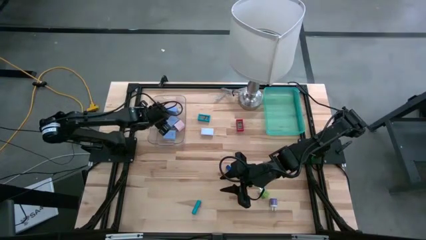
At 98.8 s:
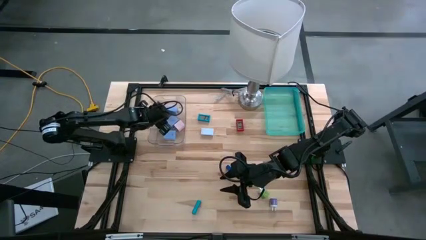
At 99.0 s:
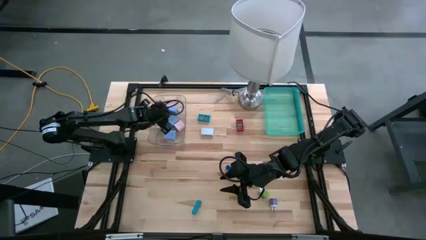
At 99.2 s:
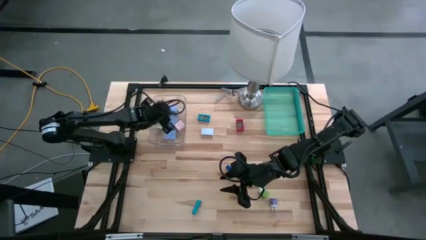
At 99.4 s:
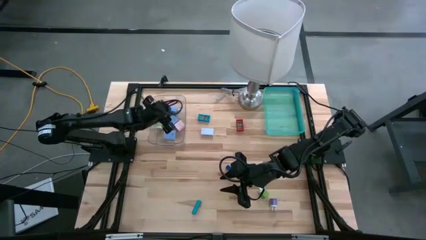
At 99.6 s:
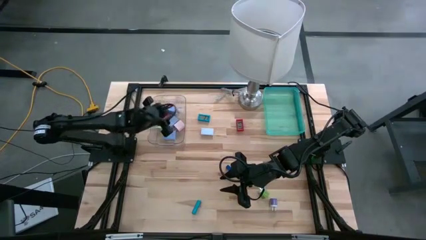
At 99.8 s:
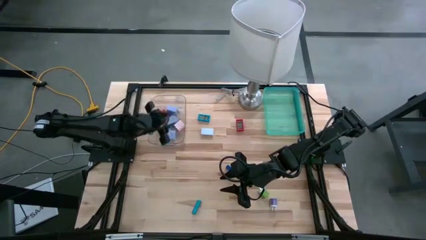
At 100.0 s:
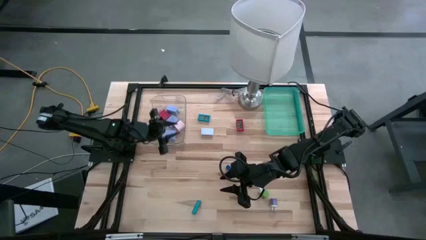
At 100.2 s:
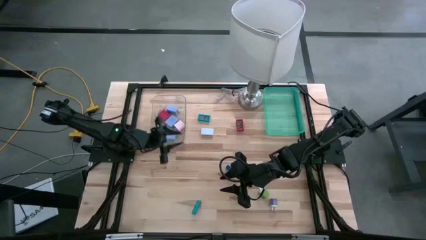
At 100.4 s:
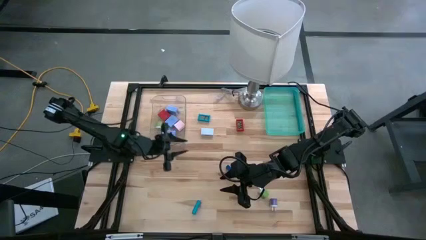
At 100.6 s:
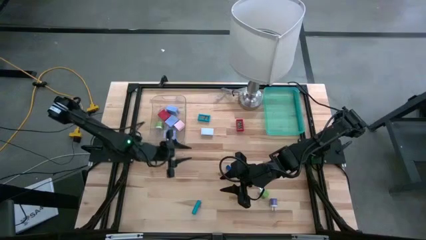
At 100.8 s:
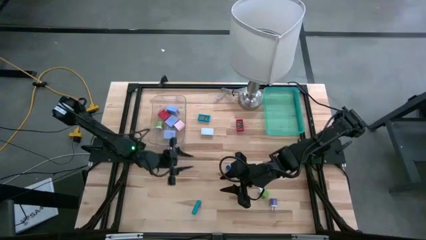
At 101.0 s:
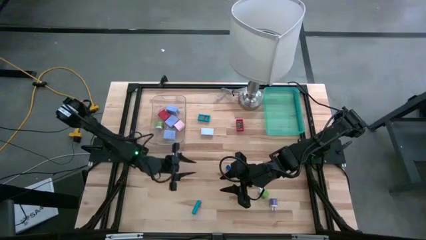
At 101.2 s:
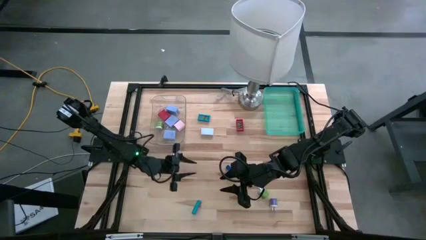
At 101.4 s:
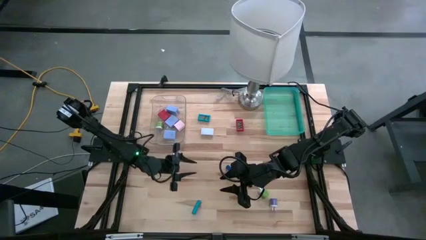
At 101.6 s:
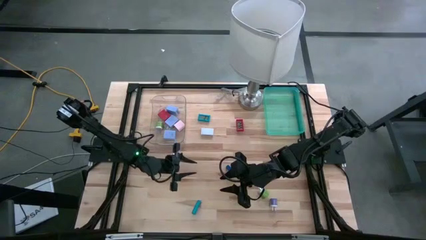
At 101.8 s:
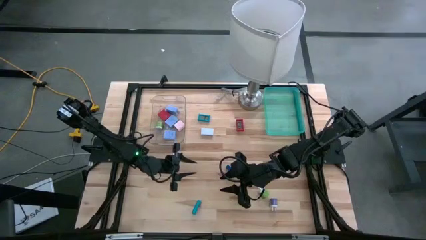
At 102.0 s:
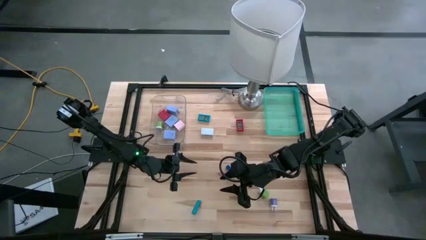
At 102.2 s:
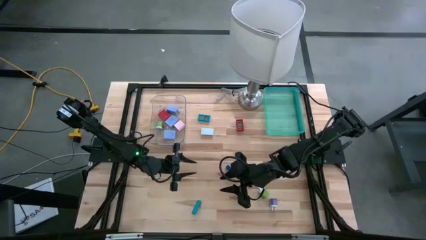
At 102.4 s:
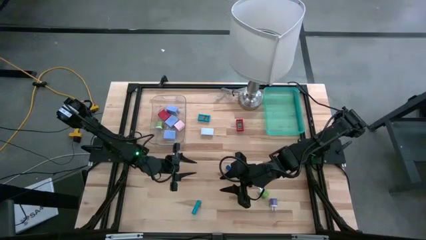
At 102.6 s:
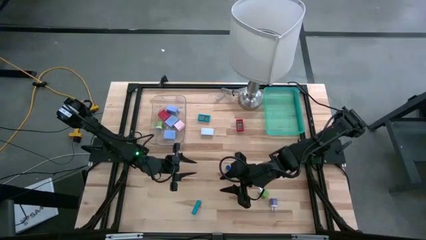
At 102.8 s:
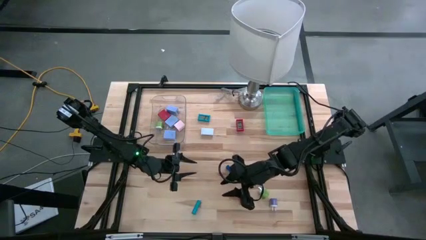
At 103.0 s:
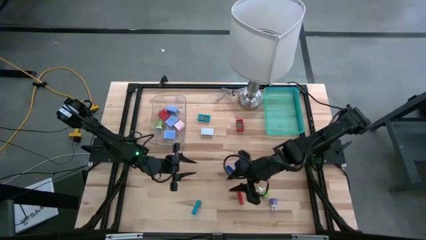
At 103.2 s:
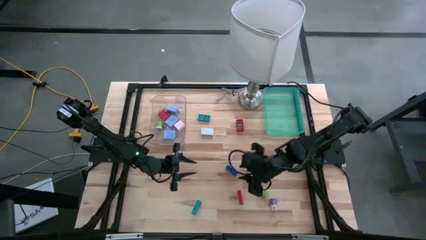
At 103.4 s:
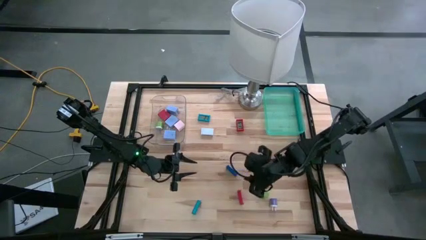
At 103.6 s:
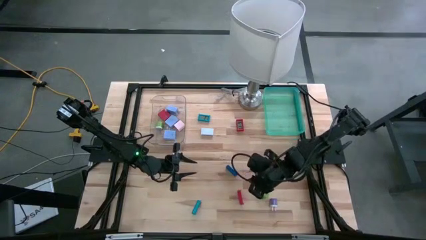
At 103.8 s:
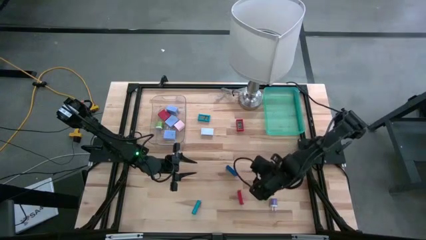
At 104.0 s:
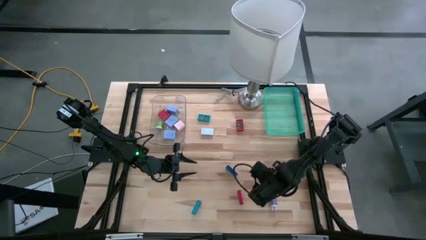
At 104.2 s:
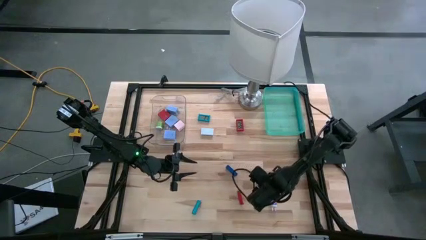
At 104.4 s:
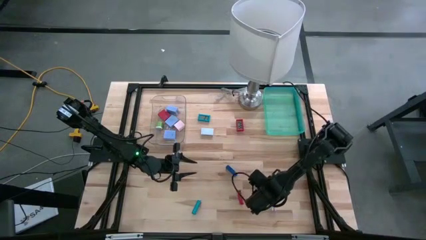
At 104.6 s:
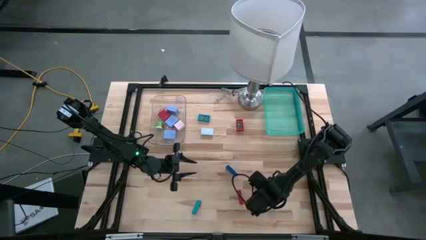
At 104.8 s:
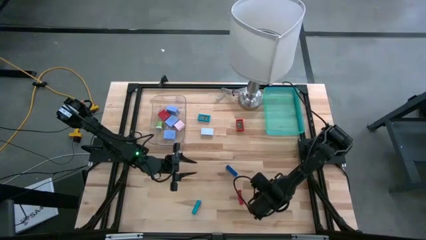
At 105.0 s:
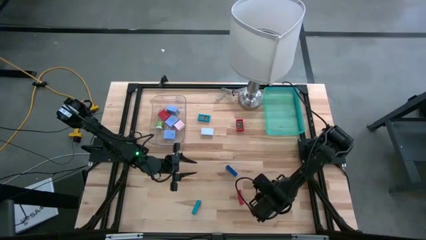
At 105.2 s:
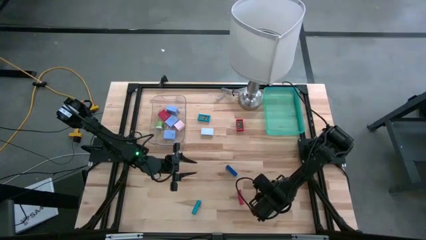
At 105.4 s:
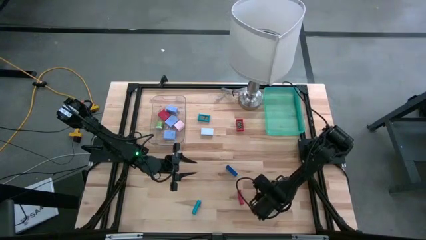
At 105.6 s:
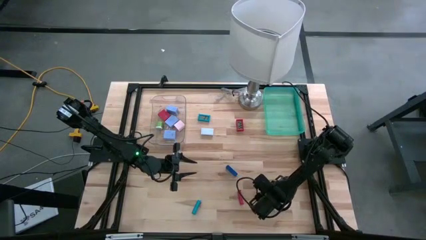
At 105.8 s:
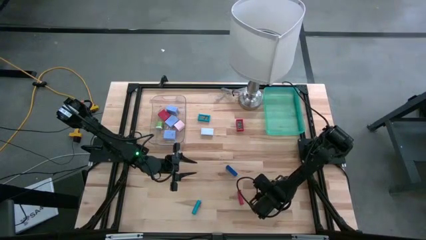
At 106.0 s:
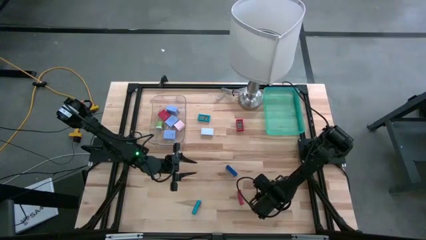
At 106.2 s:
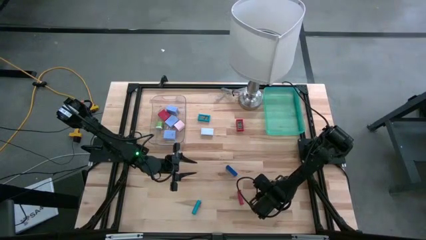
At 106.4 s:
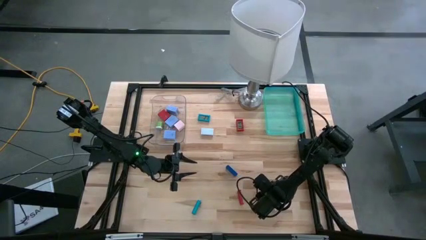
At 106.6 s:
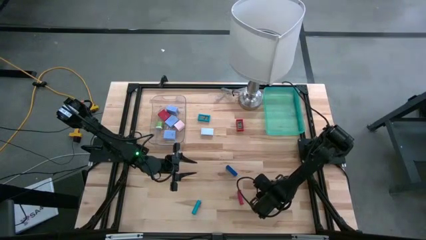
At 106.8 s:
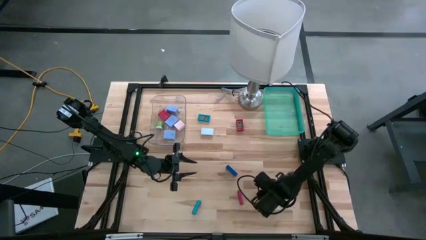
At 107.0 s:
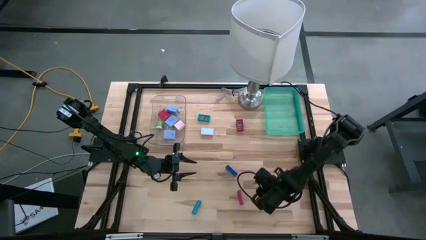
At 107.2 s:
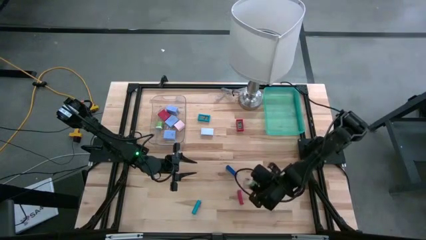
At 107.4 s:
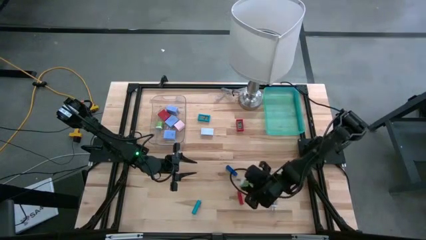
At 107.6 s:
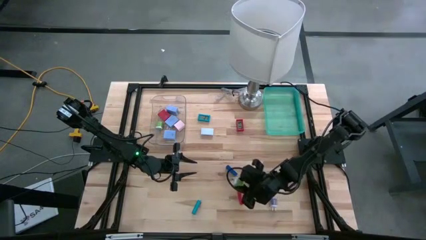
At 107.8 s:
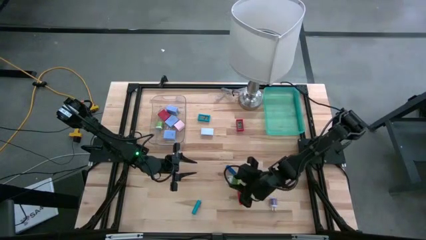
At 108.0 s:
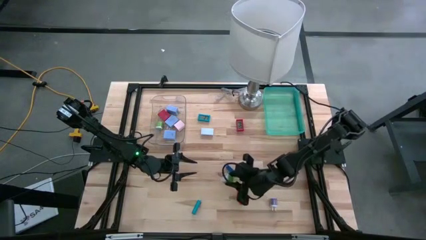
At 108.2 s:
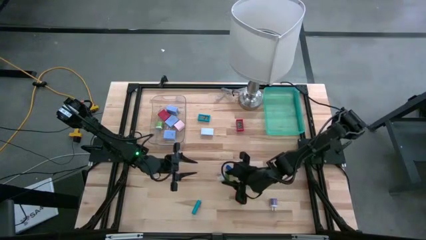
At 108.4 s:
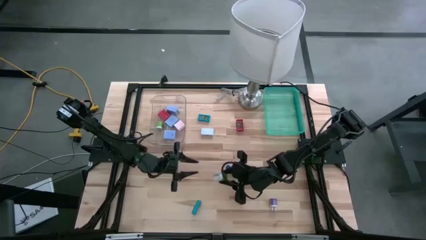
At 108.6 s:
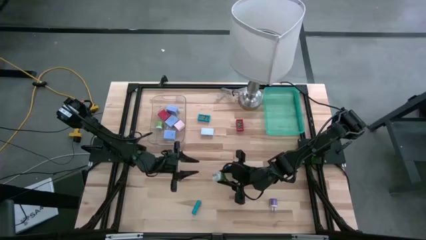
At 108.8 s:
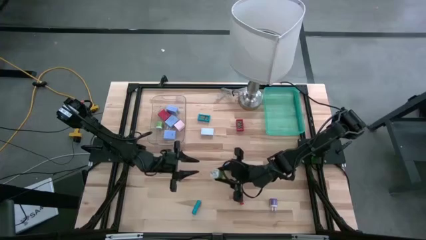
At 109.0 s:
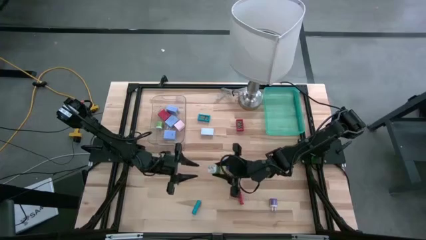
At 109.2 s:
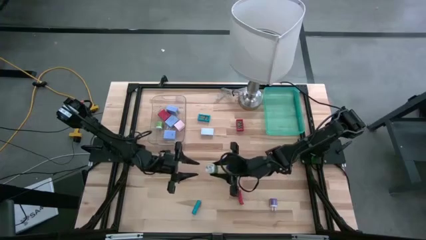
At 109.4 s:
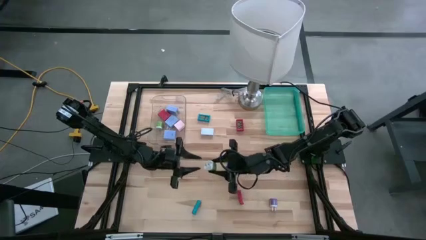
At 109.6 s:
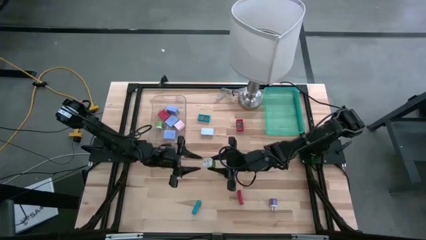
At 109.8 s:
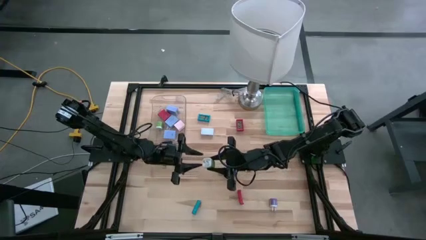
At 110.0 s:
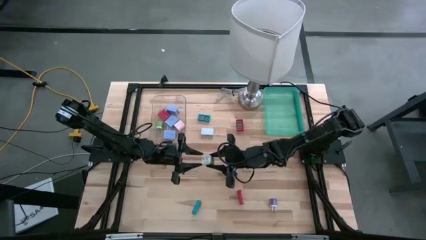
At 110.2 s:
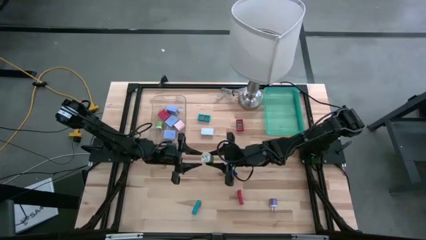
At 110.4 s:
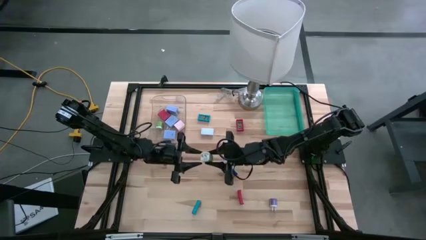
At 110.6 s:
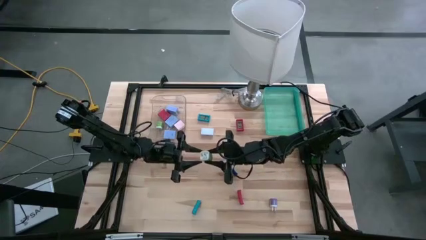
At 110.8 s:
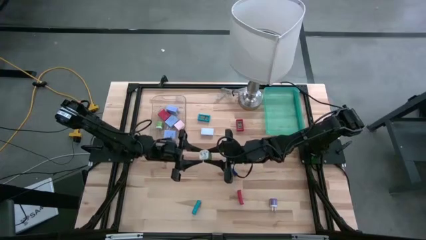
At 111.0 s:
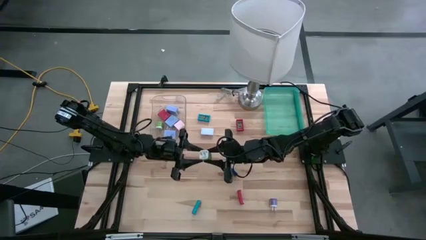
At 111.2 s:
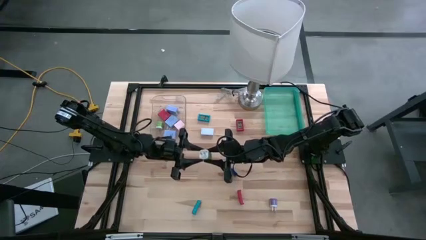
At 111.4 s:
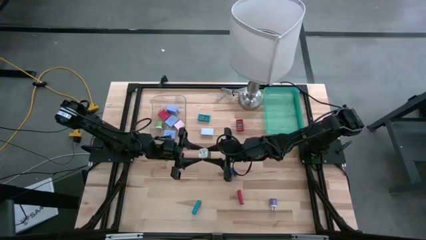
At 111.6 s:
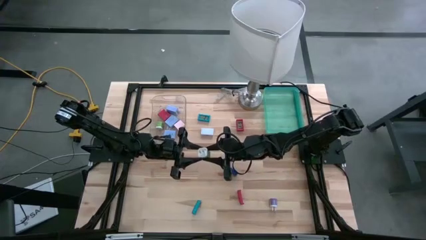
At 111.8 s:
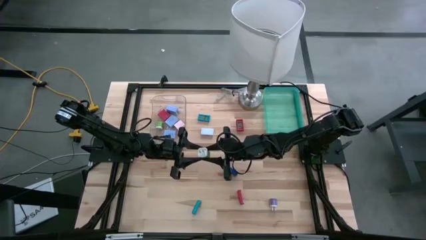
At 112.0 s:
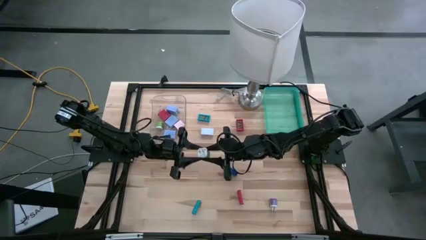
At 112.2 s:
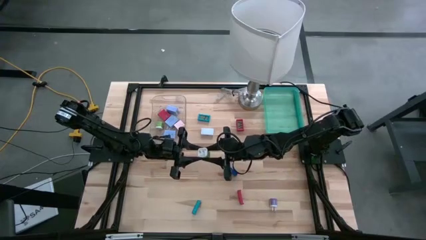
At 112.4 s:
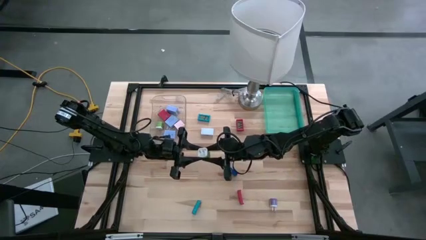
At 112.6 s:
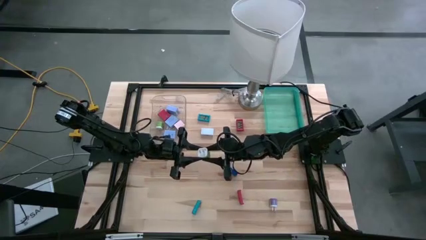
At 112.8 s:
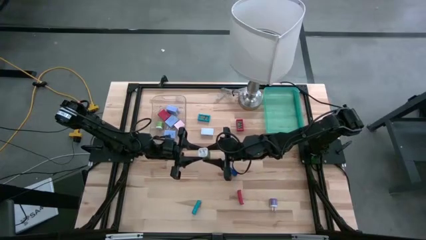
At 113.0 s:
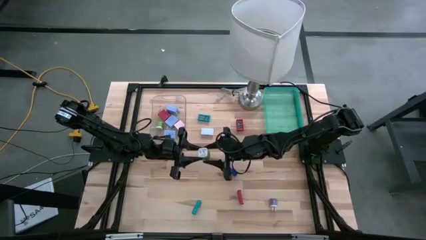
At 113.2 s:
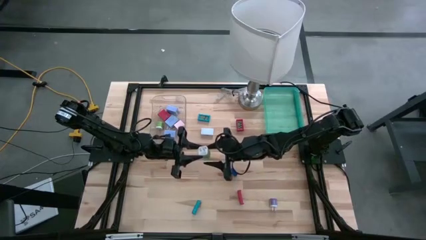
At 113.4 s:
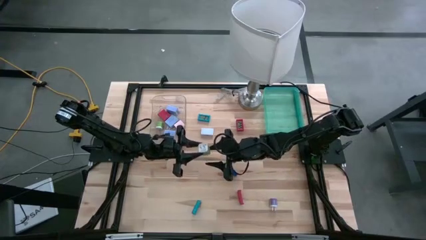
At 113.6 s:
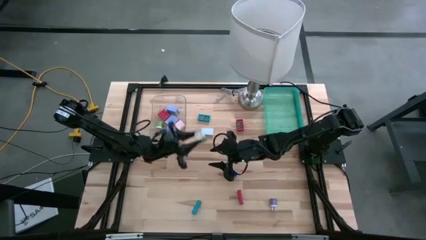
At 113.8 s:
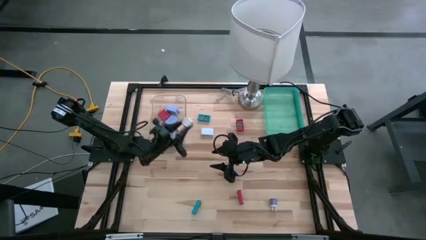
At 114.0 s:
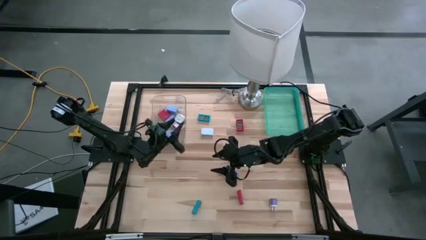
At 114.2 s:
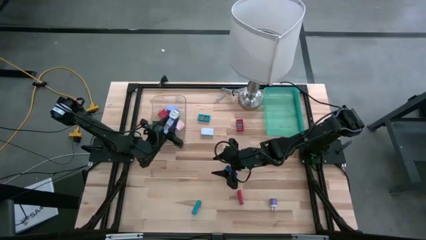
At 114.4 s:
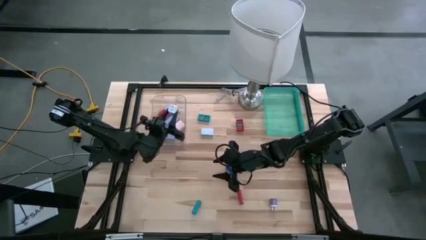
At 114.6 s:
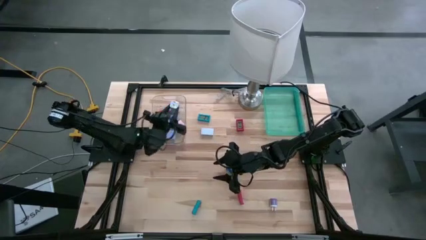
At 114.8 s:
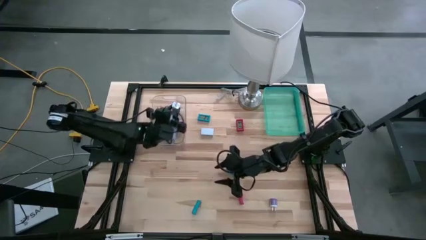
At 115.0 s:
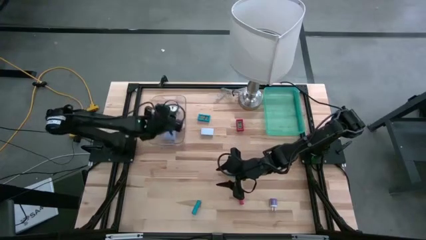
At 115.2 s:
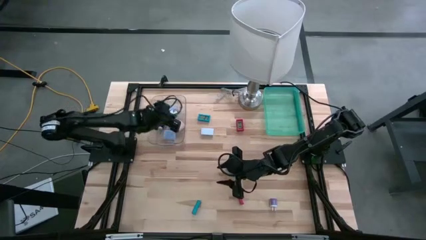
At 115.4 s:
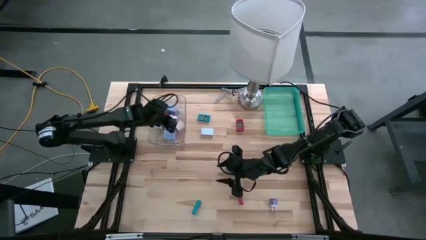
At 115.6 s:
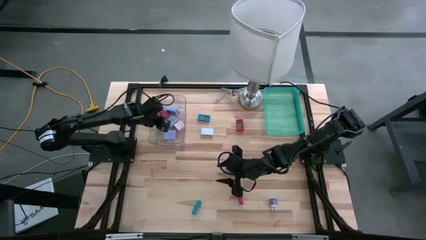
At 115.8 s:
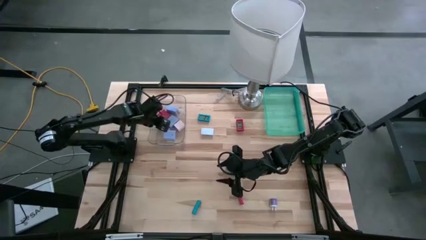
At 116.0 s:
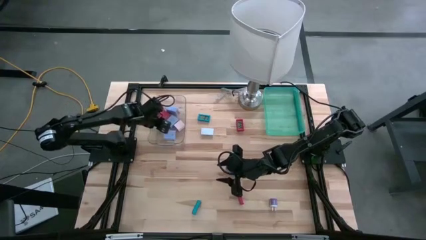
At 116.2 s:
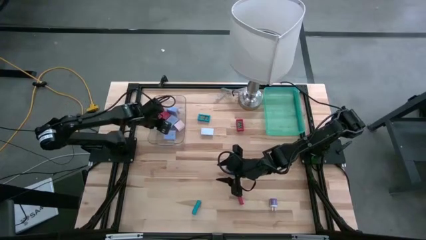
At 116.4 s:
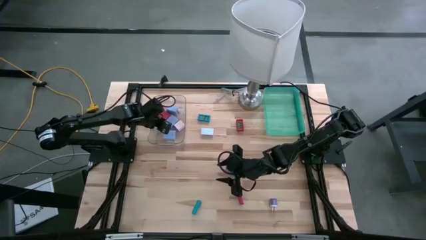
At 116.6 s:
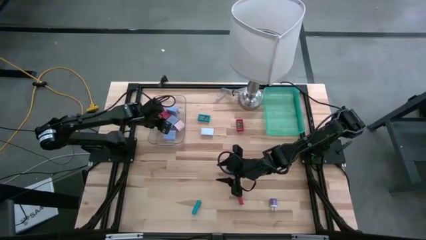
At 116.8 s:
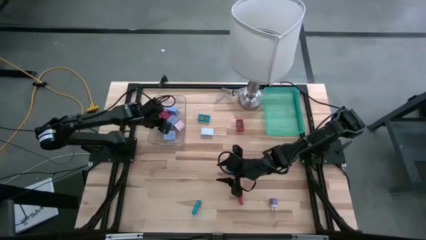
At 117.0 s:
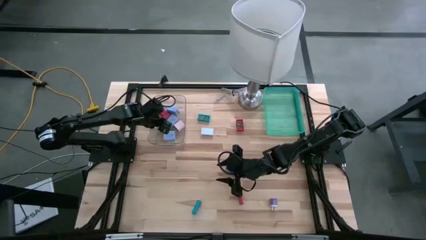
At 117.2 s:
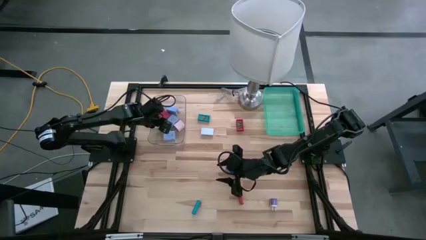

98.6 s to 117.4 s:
Task: Pick & Place Office items
Put the green charger adapter into the transparent bin
